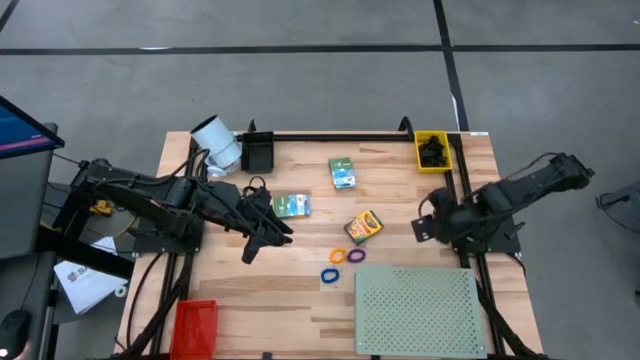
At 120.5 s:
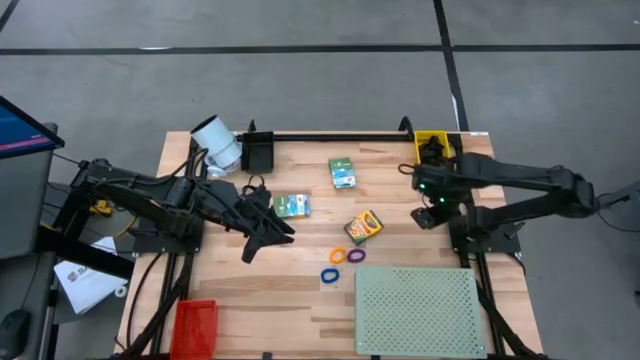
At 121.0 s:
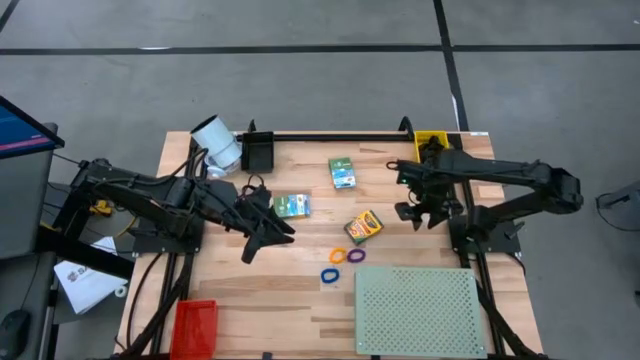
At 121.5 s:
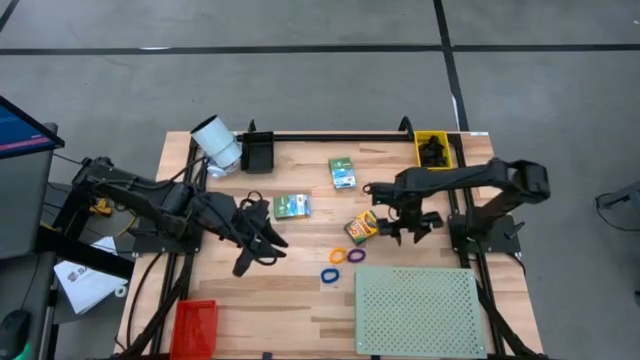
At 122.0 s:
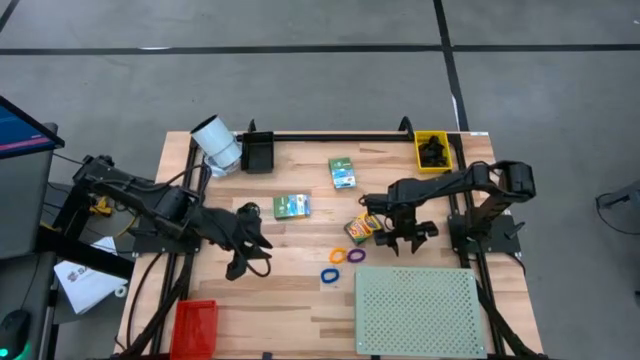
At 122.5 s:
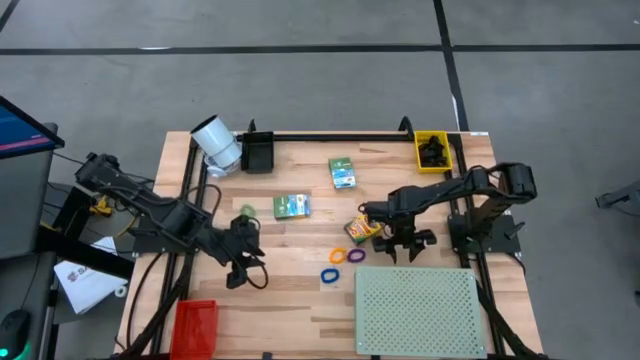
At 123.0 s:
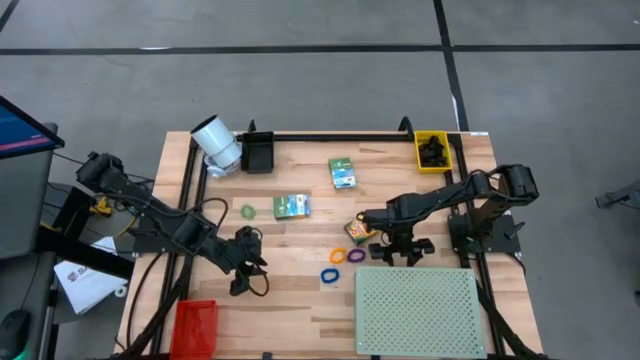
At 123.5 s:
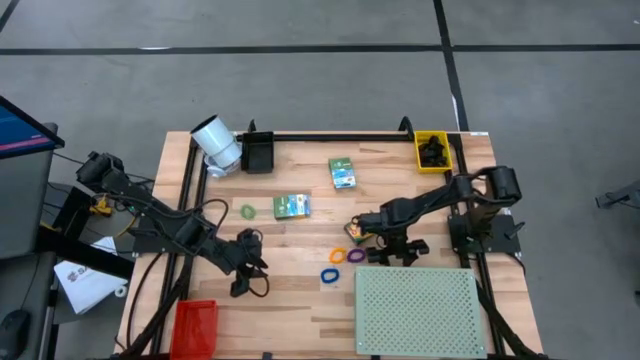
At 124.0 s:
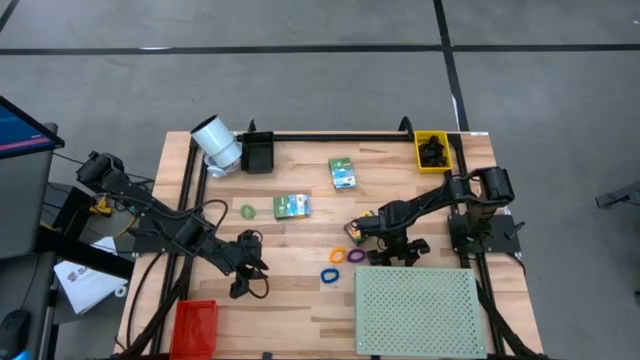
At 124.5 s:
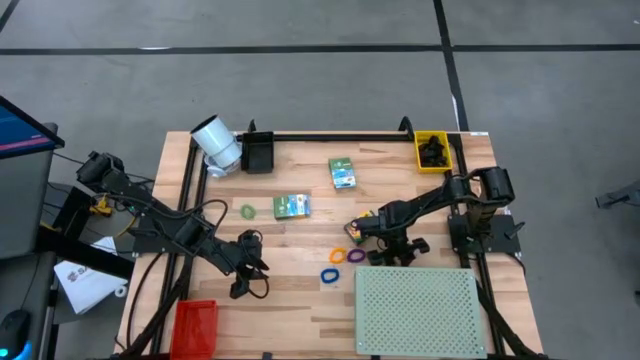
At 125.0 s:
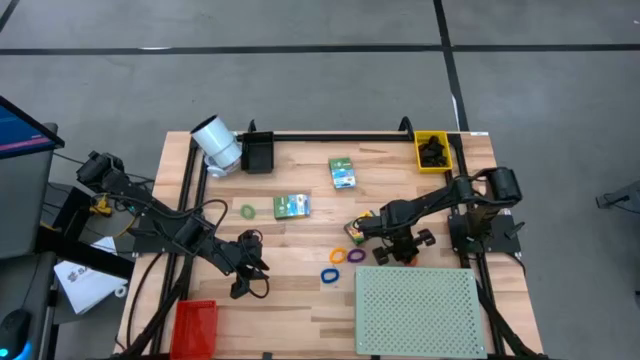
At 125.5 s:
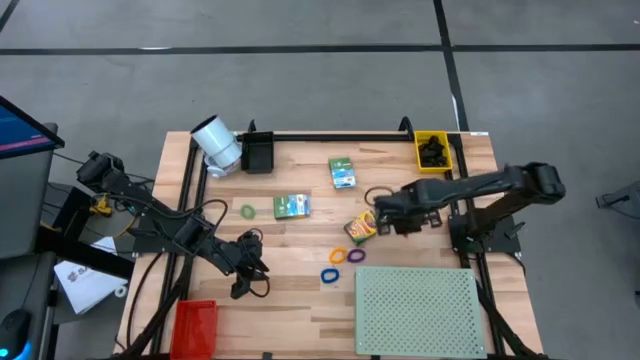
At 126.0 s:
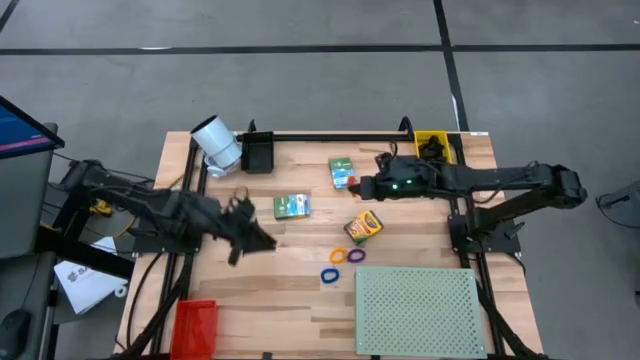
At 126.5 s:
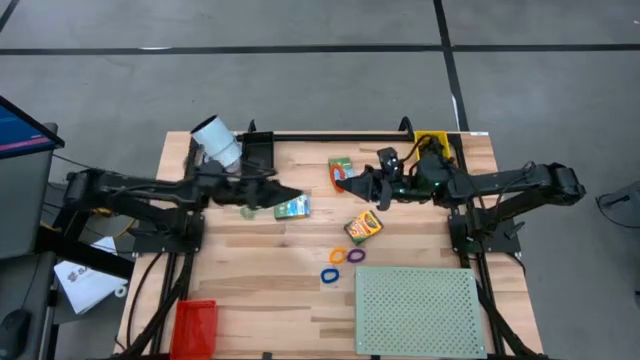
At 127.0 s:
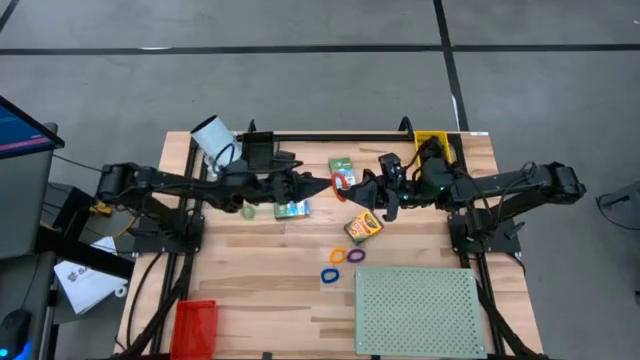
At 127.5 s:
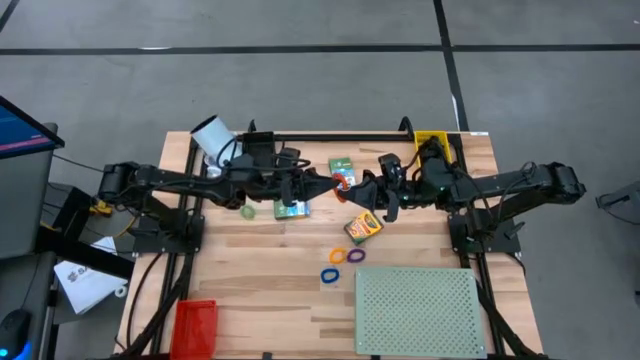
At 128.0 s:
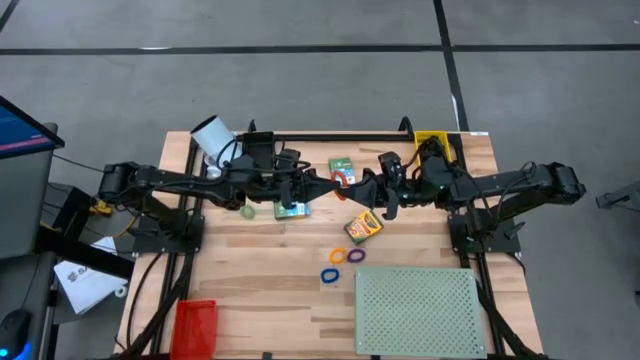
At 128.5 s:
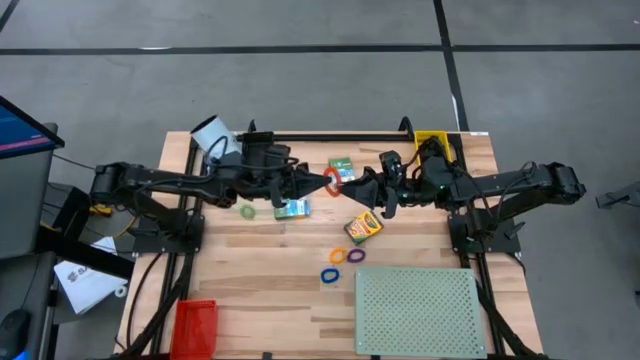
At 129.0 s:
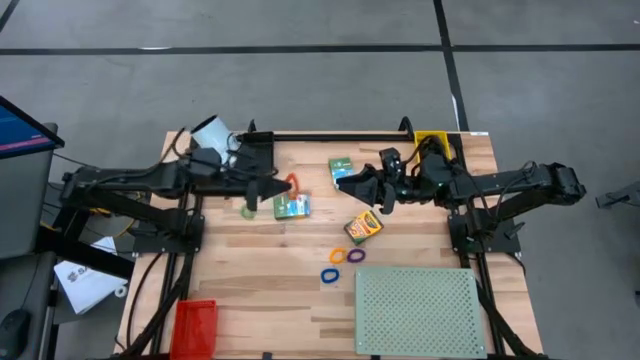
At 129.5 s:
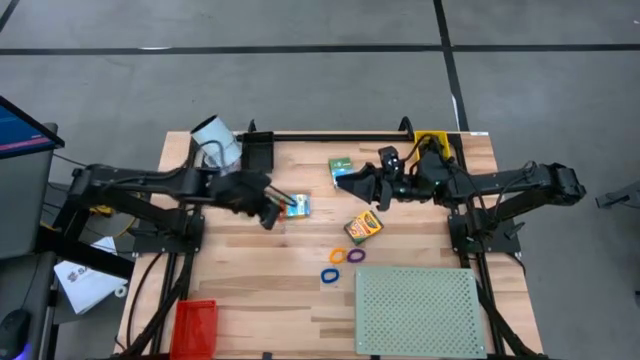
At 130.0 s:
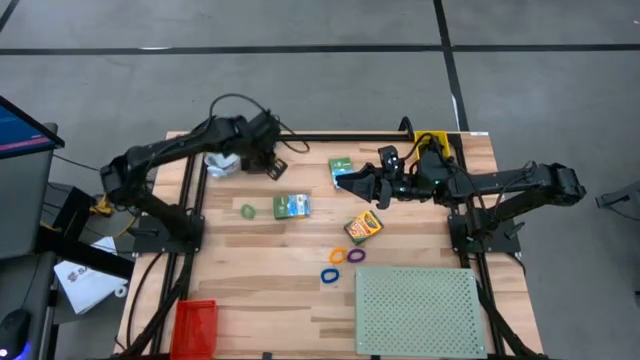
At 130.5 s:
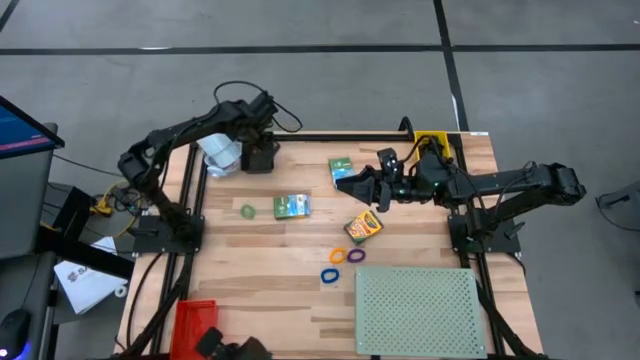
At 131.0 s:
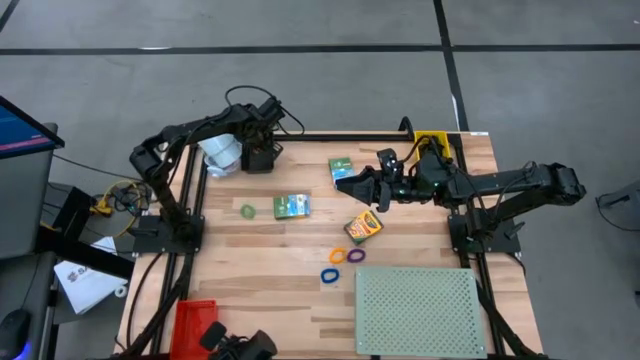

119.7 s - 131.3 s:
Task: Pick & Place Office Desk Supplies
Put the orange spring keychain into the black bin

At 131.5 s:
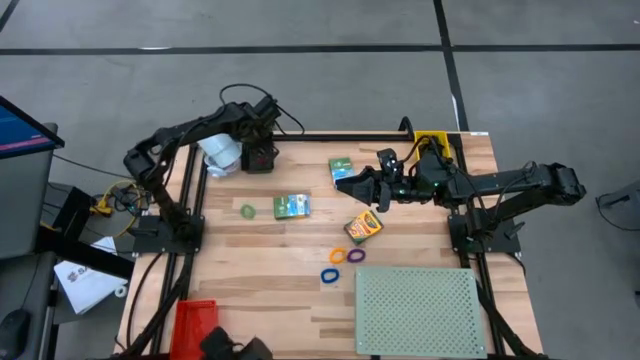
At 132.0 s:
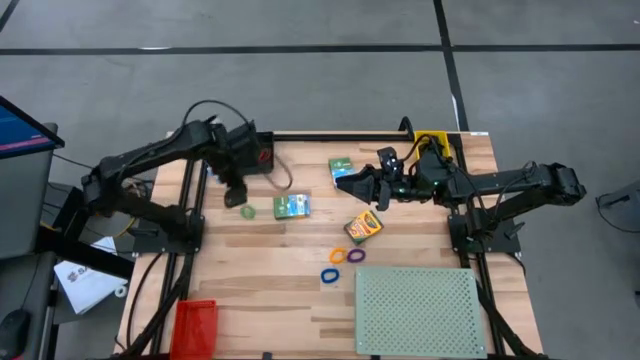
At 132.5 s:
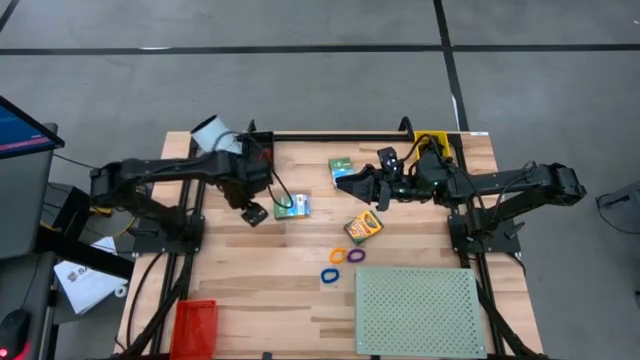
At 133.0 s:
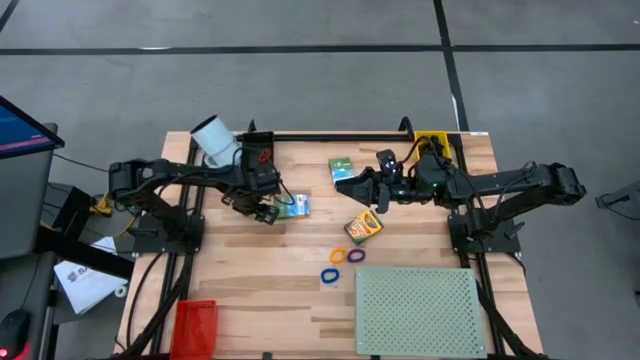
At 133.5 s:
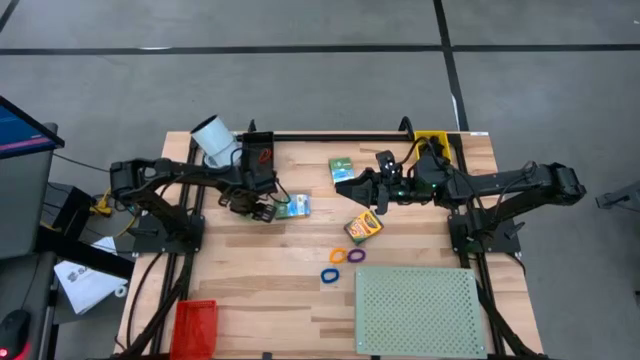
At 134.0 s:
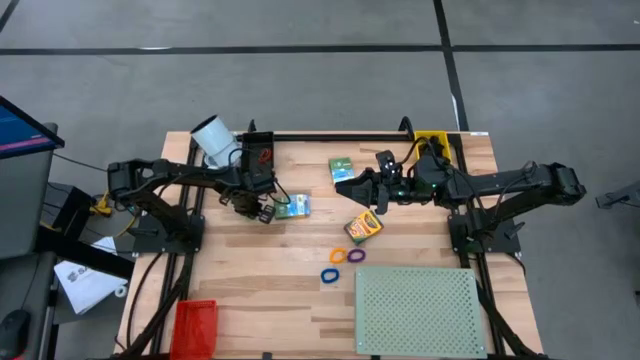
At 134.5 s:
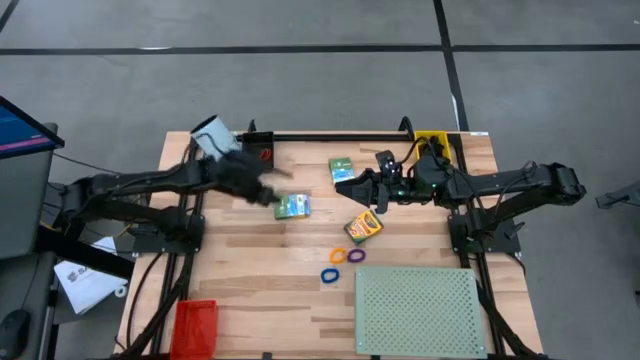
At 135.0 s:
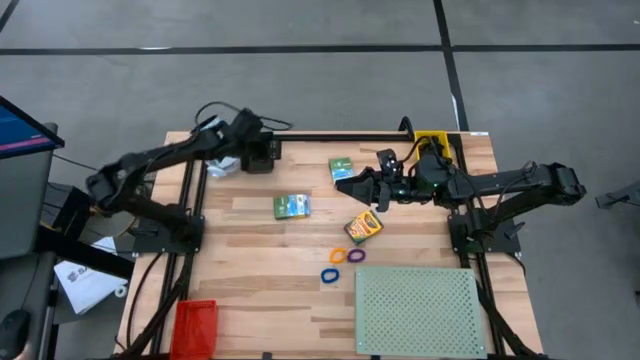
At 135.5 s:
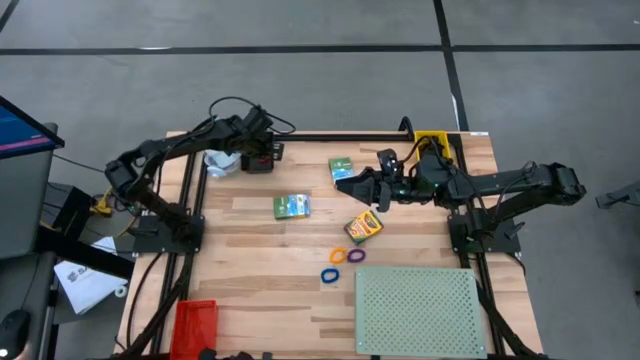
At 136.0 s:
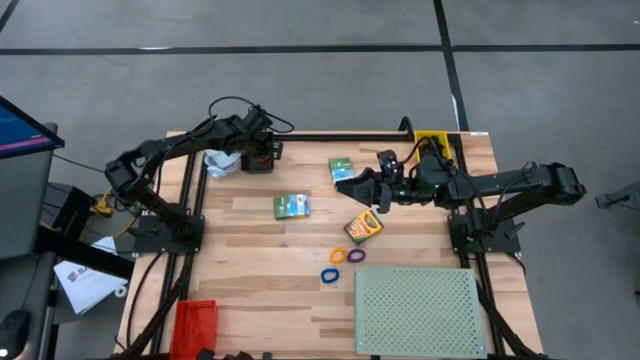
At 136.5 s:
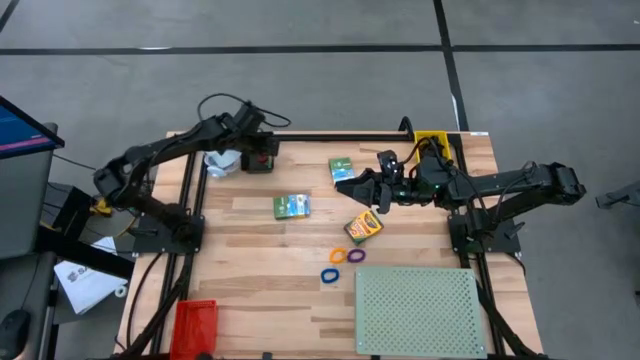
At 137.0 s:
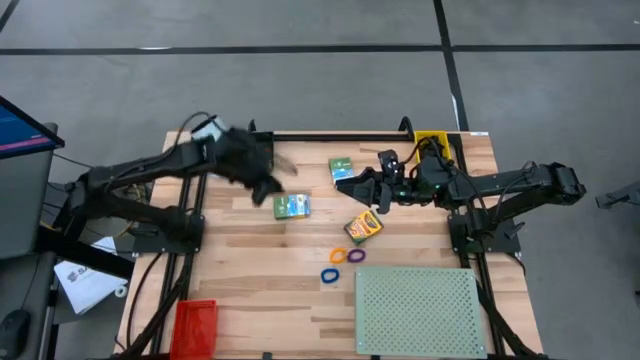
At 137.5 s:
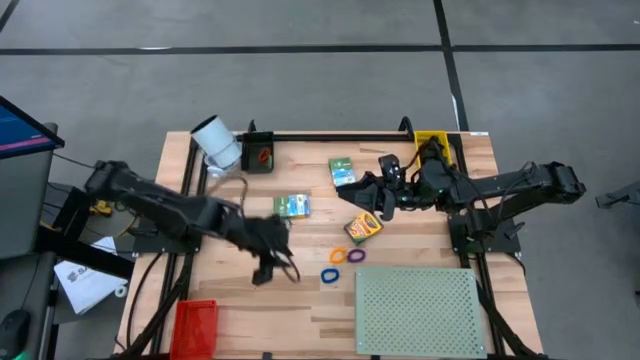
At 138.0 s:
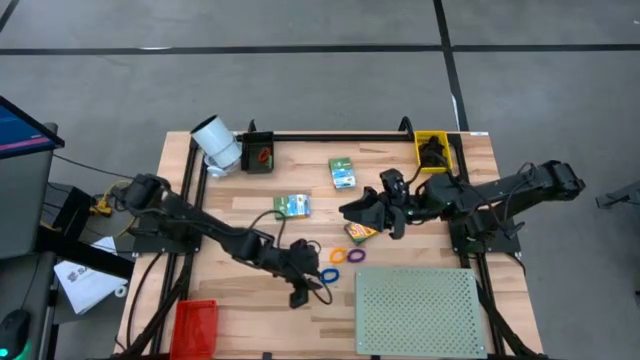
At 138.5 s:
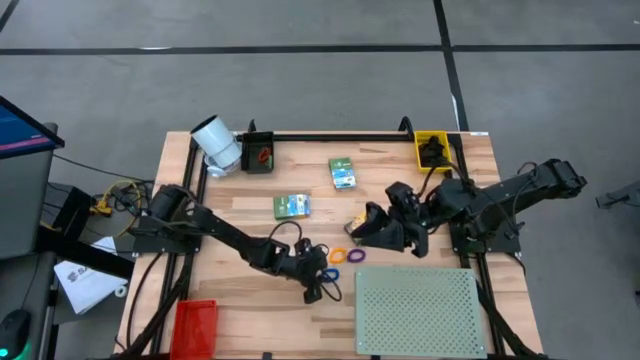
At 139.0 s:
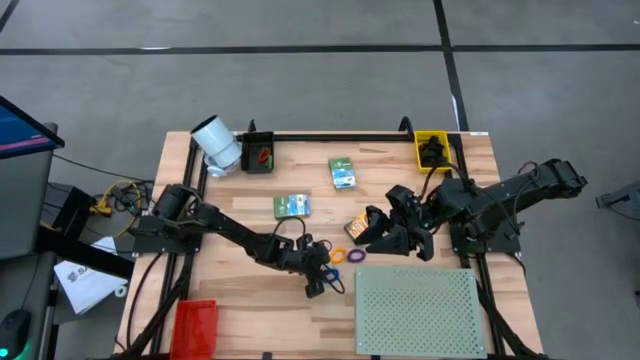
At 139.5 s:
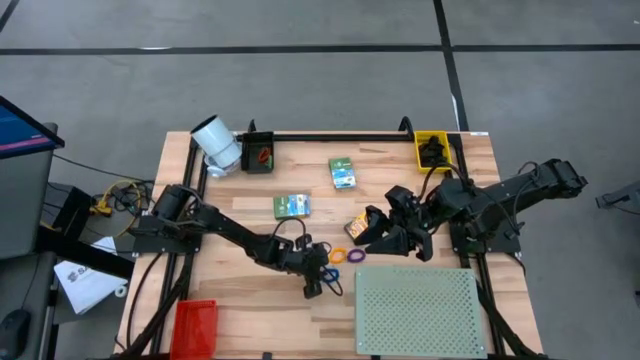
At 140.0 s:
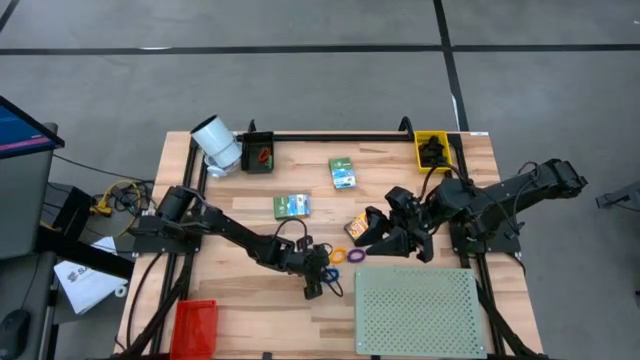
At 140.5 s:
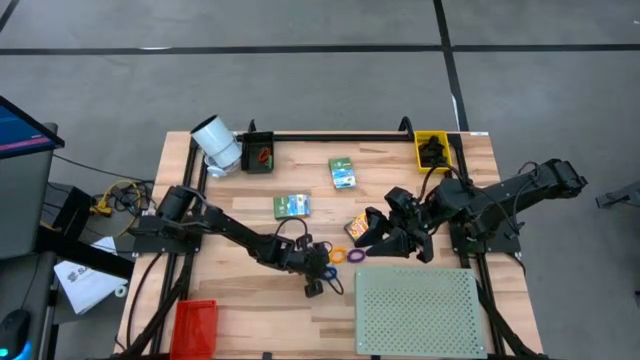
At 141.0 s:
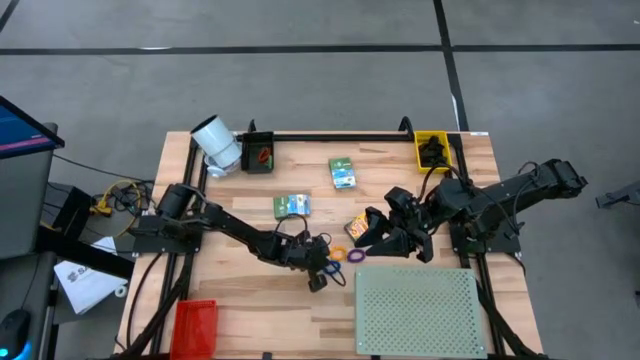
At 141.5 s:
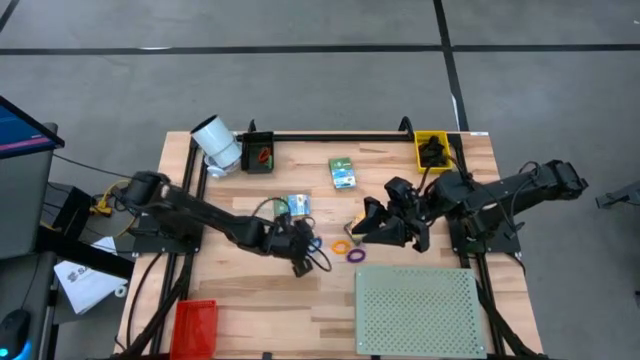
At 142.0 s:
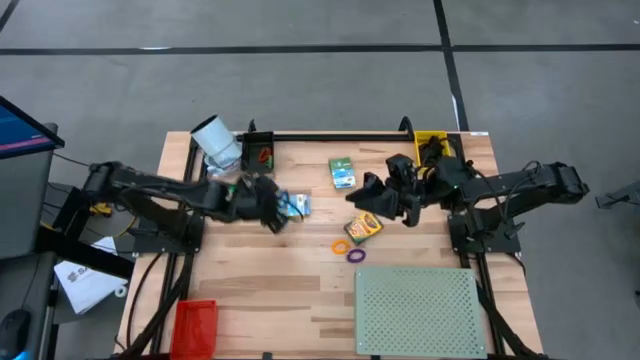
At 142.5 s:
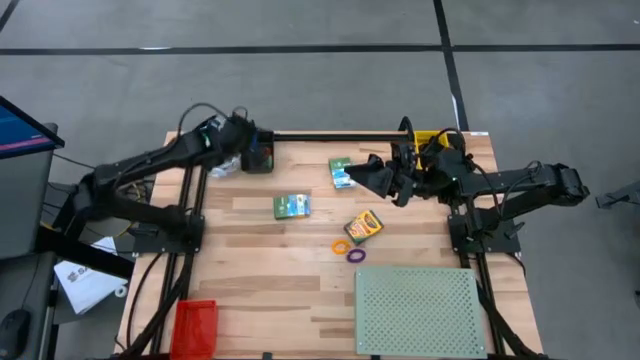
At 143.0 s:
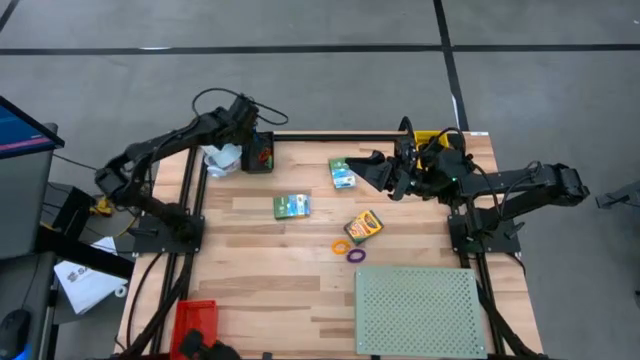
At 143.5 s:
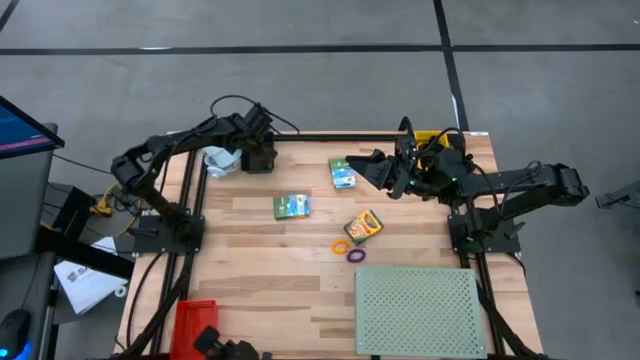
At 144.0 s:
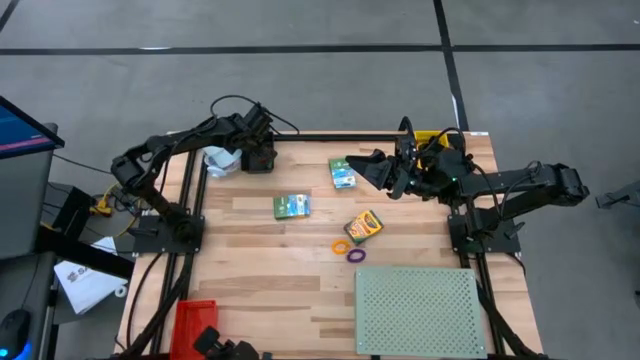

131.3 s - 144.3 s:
Put the green spring keychain into the black bin
